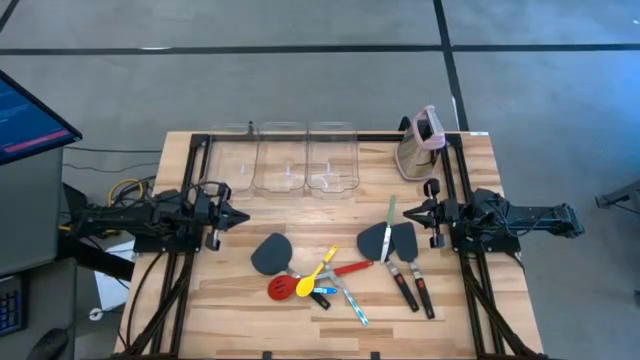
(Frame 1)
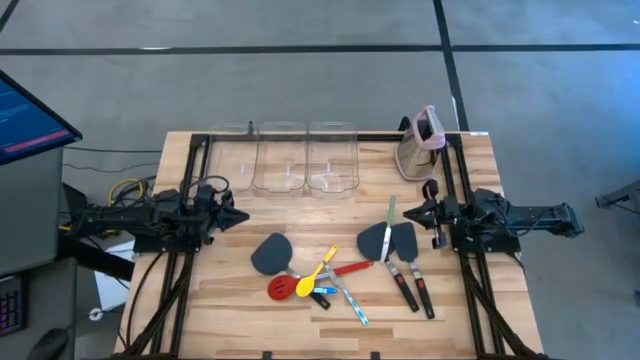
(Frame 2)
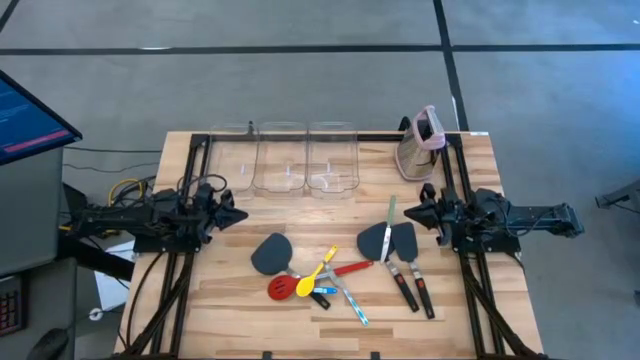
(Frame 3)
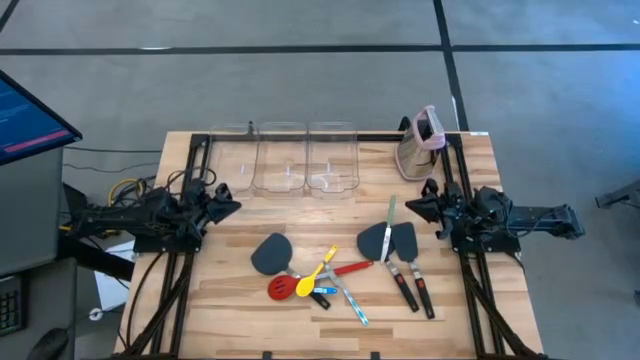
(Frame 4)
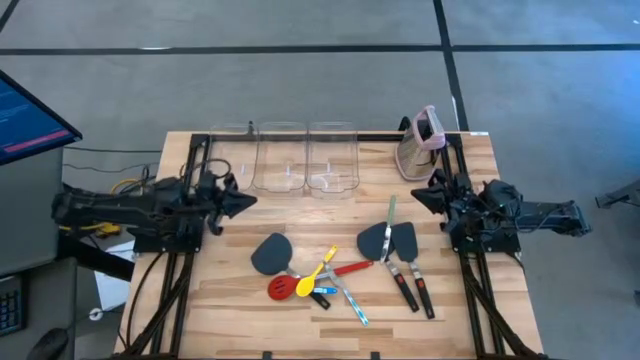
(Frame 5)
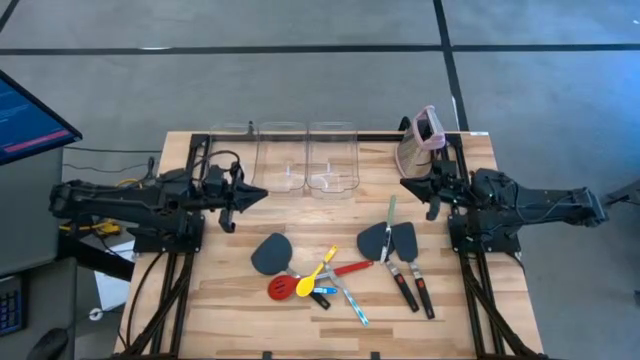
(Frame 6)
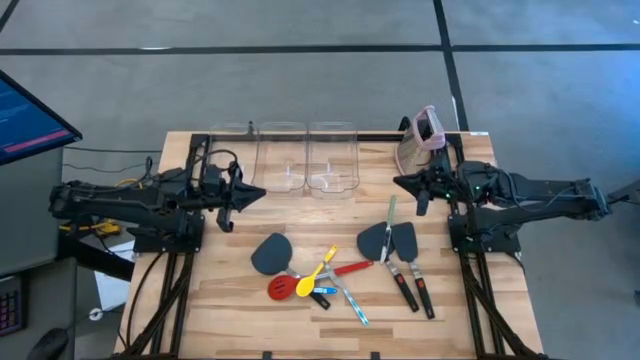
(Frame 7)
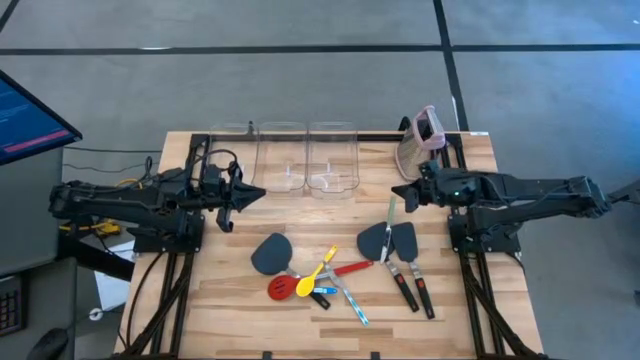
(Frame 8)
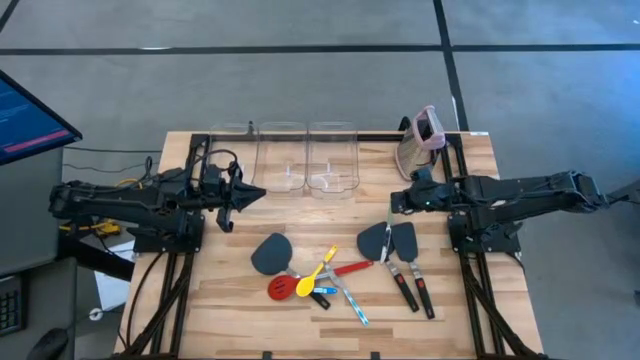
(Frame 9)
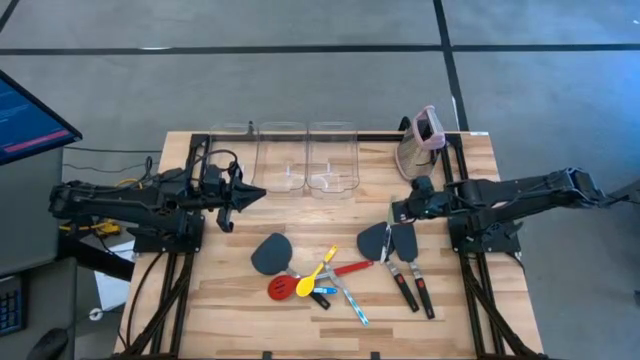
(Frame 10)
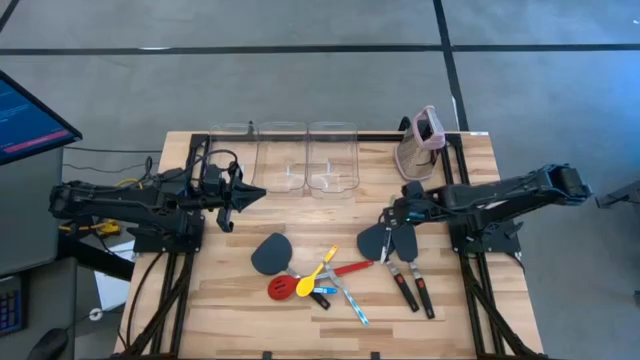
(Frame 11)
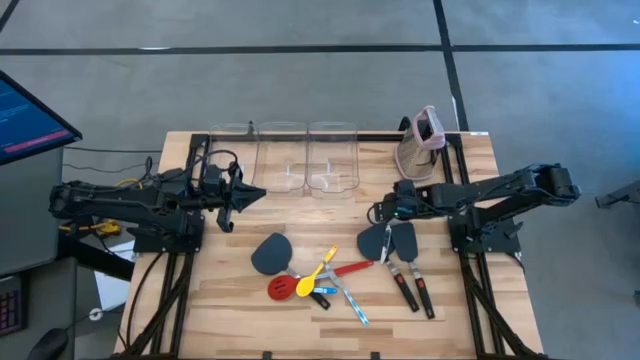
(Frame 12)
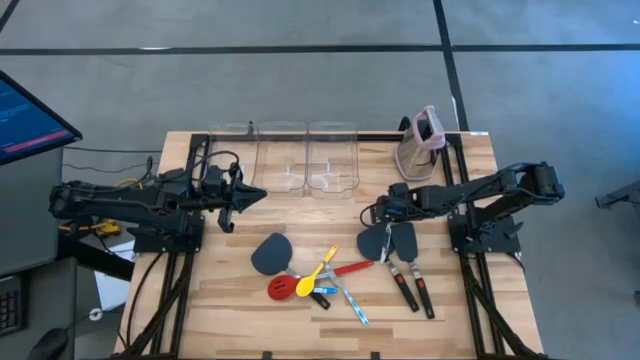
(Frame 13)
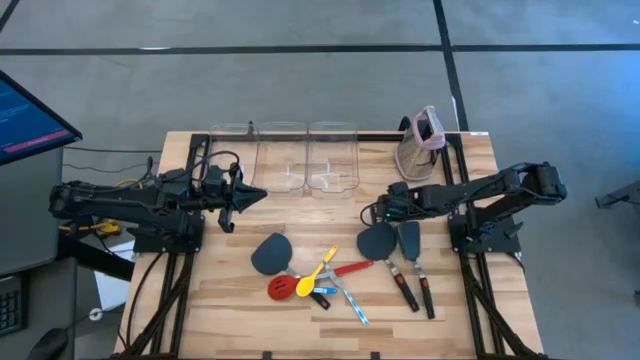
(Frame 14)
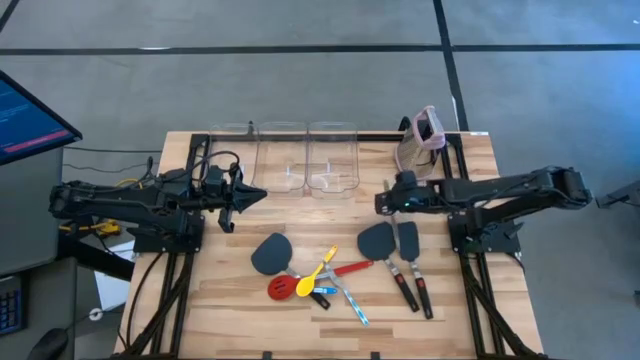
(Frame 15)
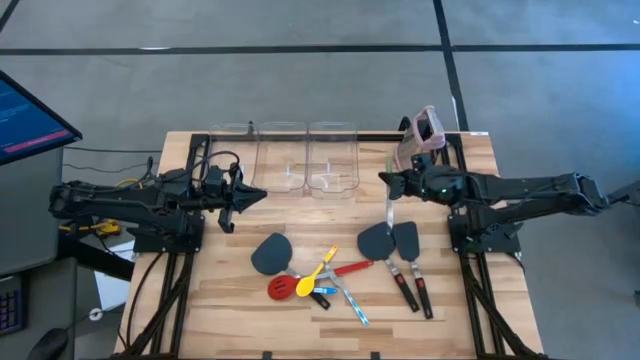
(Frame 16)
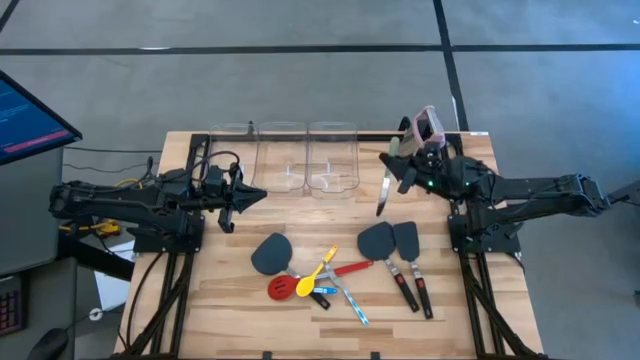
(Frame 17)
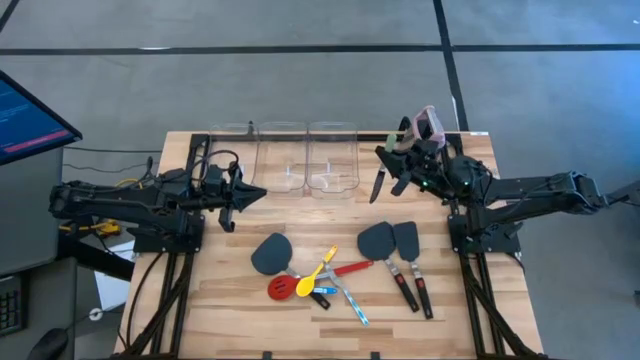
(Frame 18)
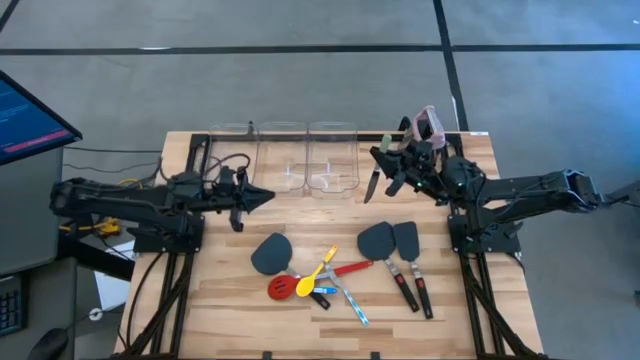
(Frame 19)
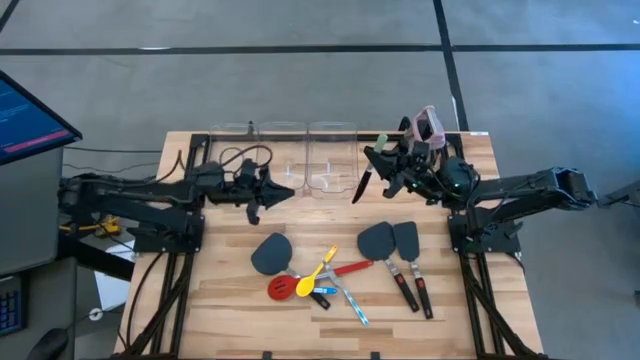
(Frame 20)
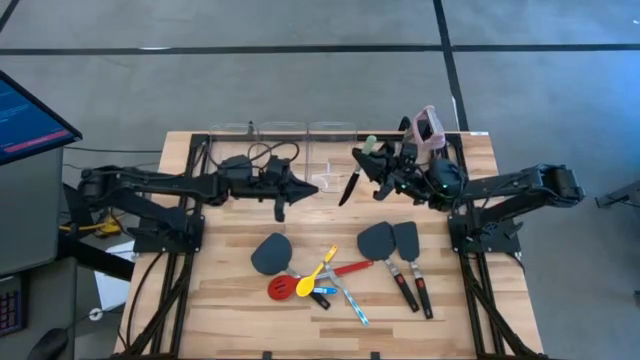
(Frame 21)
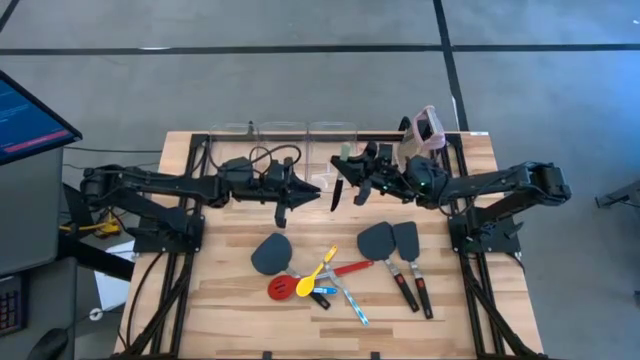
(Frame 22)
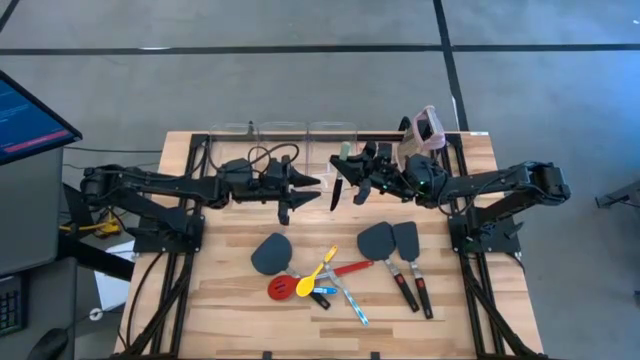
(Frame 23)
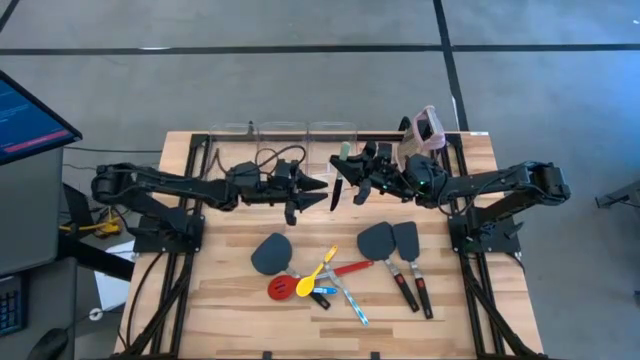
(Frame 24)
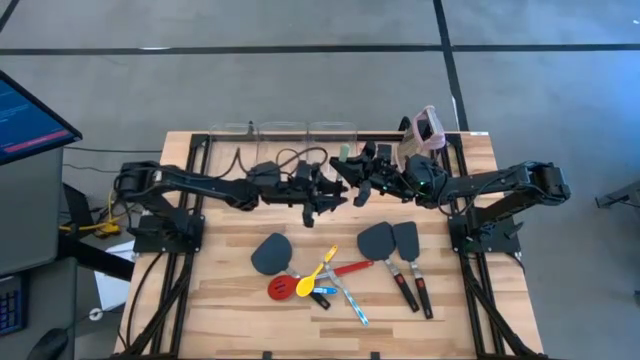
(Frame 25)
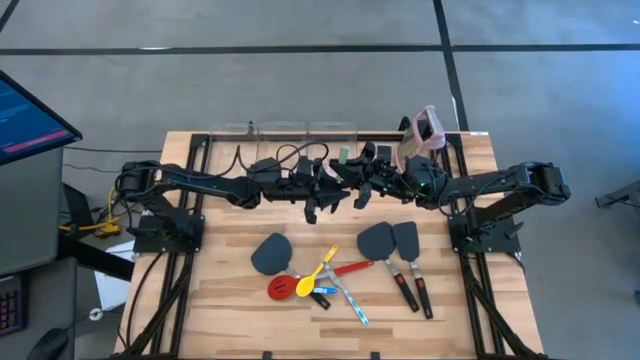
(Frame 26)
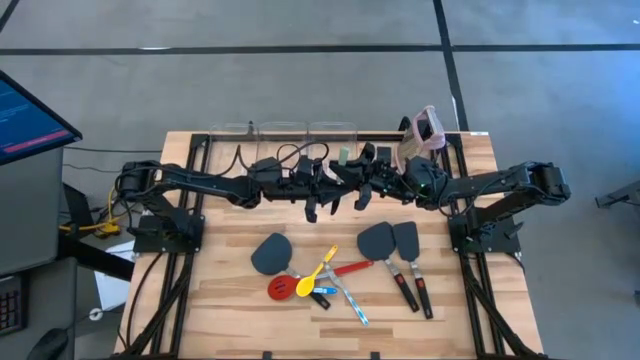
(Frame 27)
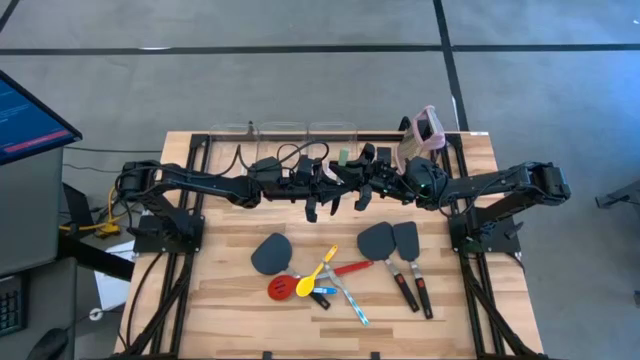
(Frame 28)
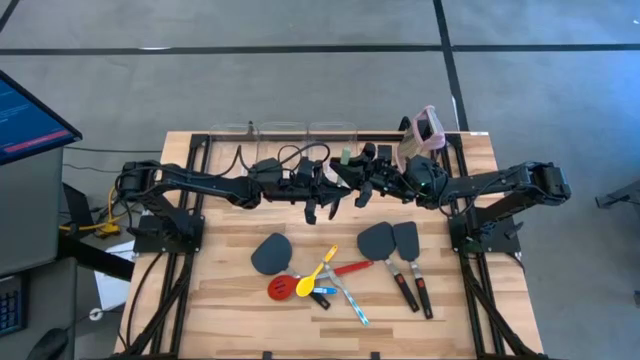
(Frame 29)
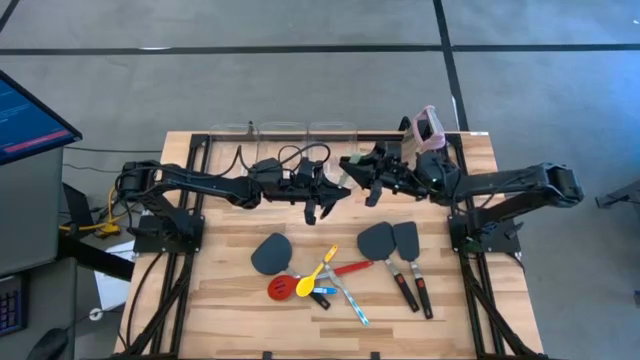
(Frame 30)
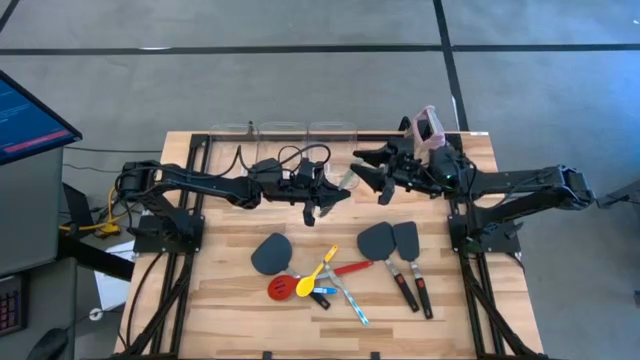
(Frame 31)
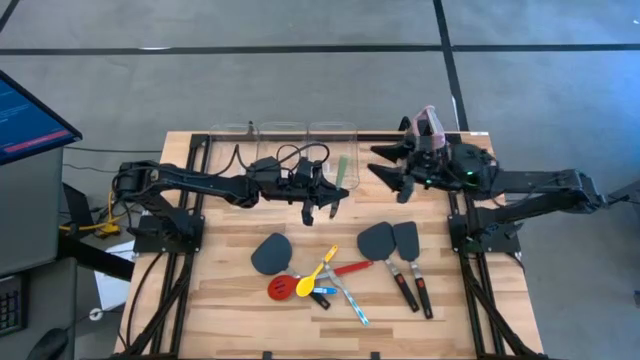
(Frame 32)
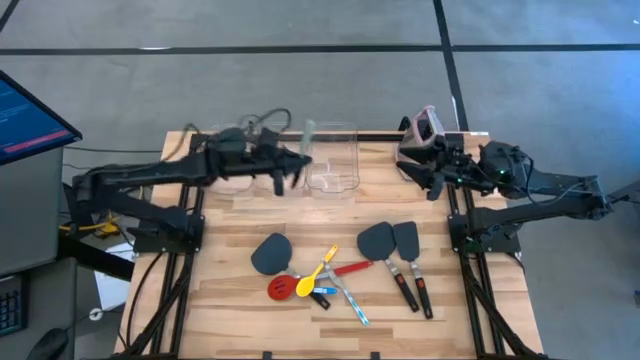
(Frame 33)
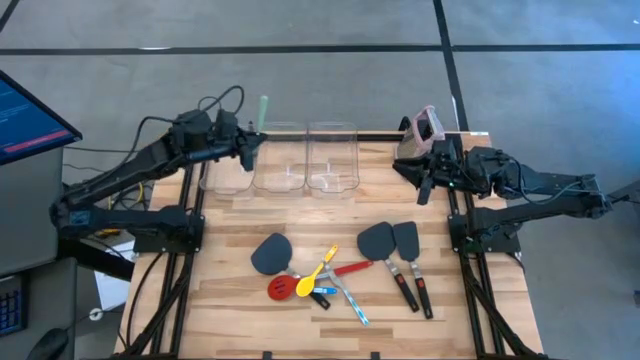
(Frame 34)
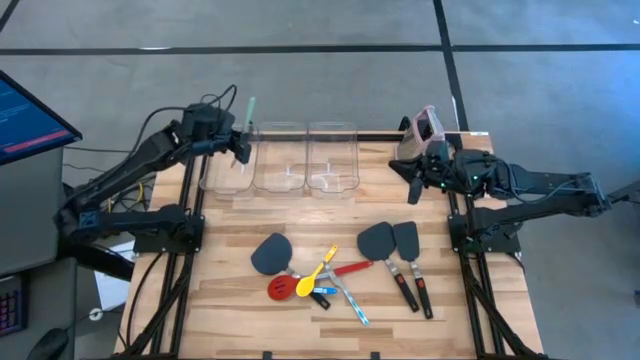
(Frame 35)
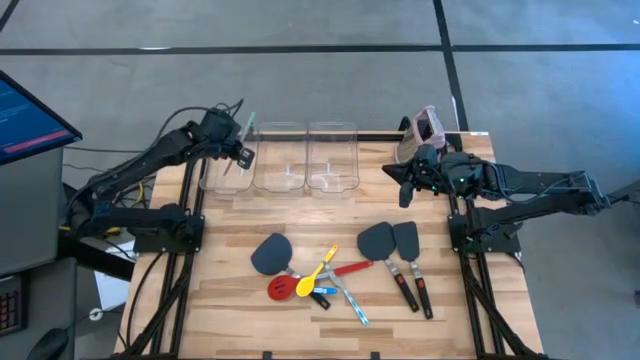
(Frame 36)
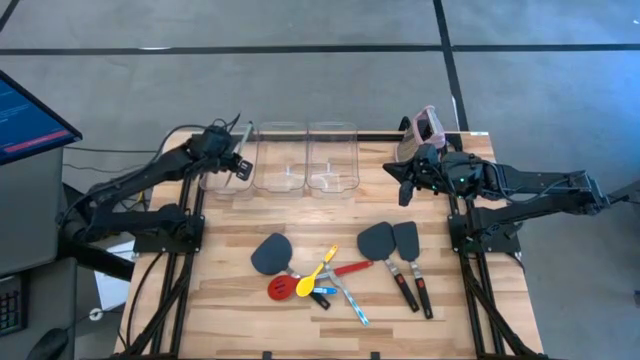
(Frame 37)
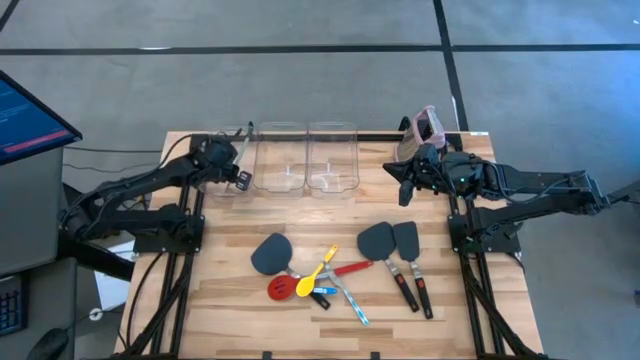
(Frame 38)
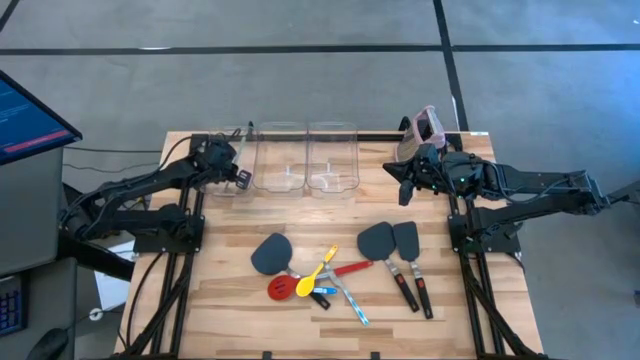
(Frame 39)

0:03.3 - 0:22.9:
Task: Pick & Place Kitchen Items
Put the green knife into the left transparent bin

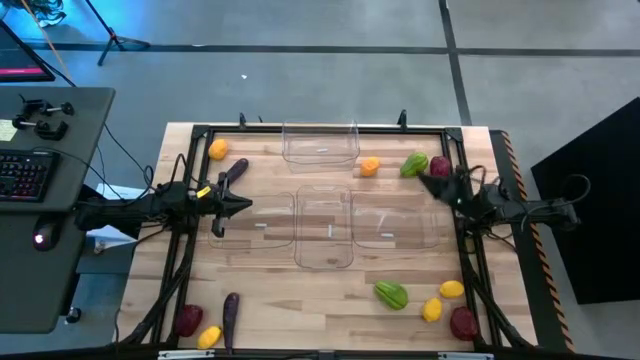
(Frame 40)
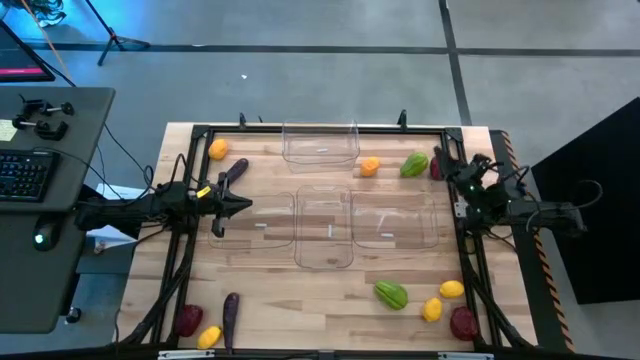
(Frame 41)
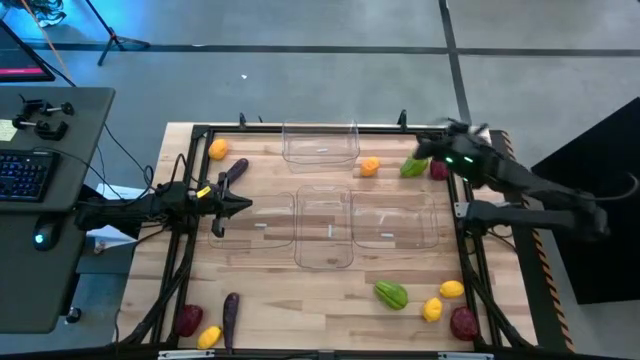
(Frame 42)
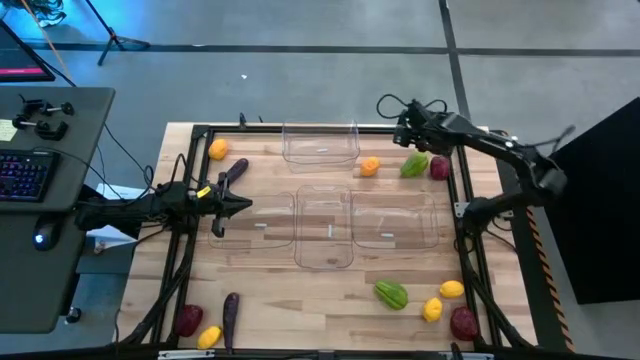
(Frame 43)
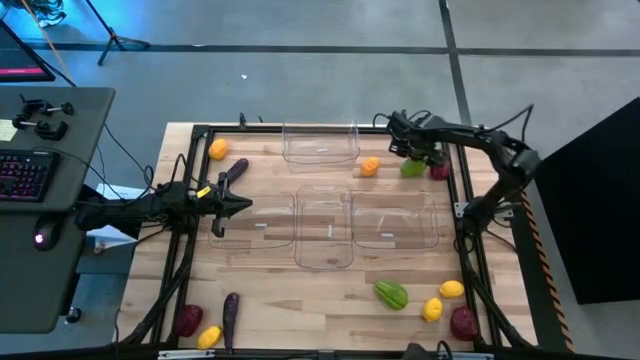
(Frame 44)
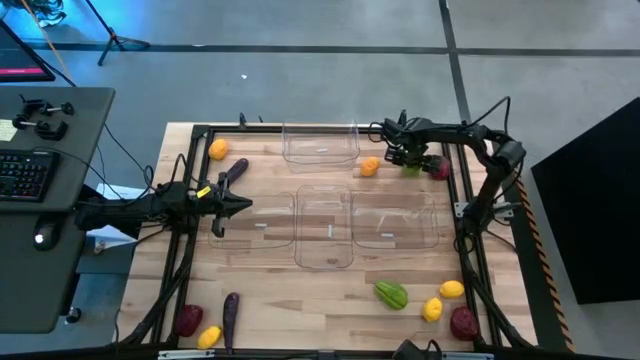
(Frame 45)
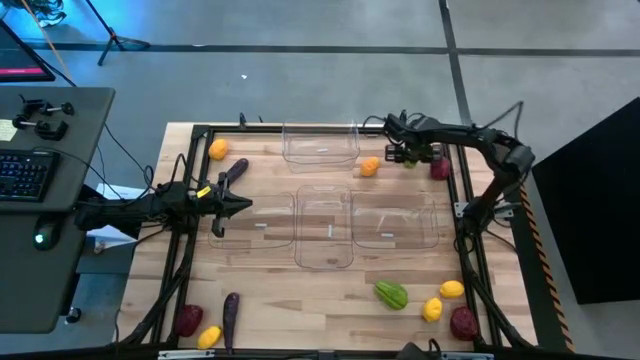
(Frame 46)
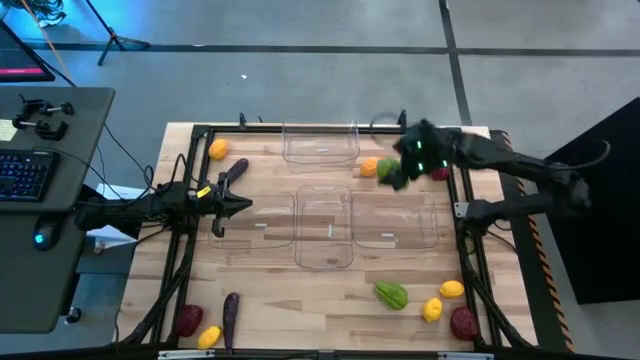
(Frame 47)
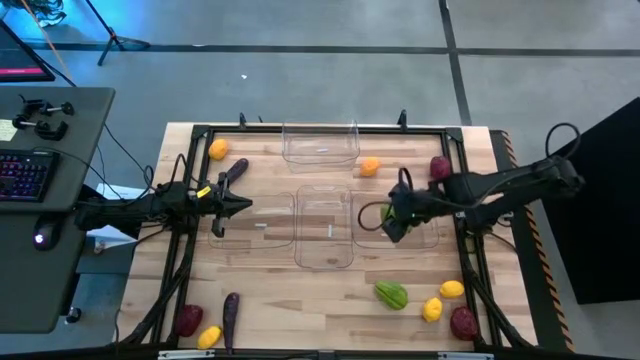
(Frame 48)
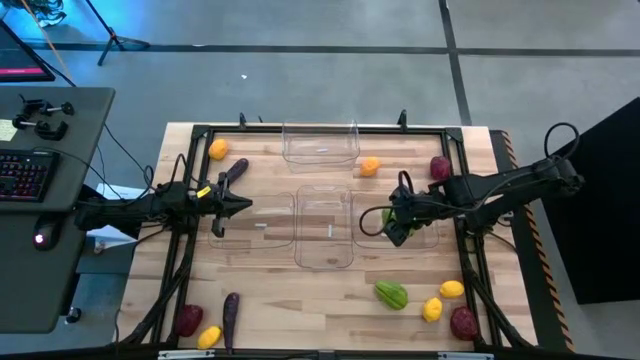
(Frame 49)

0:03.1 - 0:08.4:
Task: Sort produce into baskets
Put the chayote into the bottom right transparent bin
